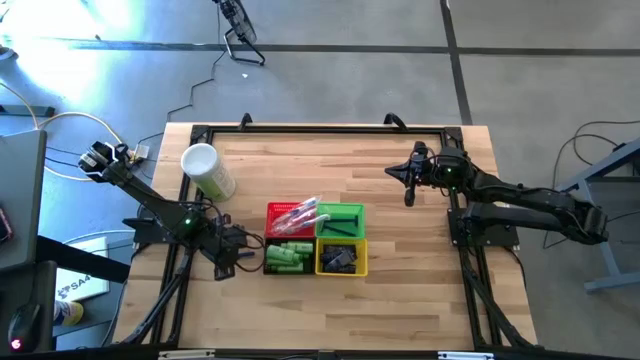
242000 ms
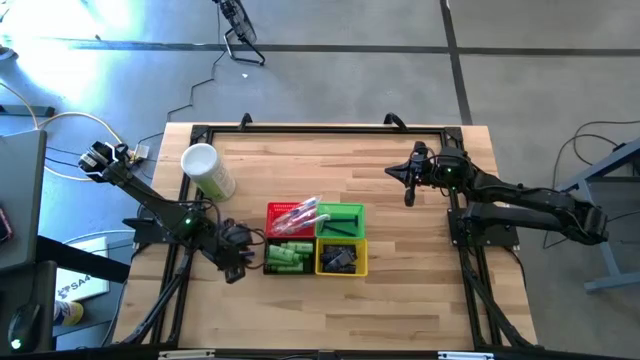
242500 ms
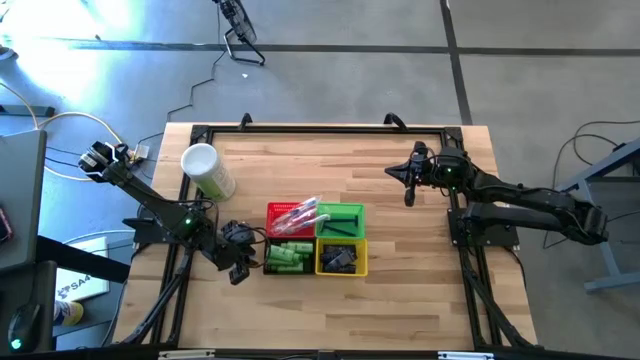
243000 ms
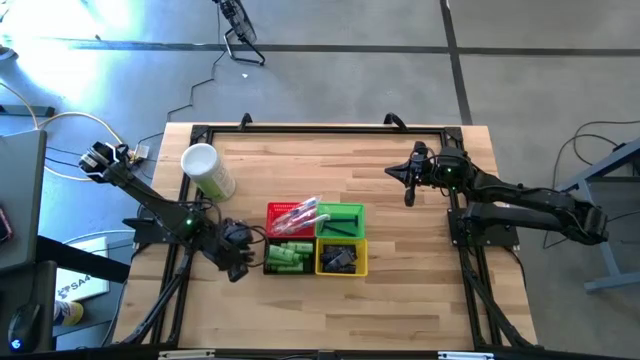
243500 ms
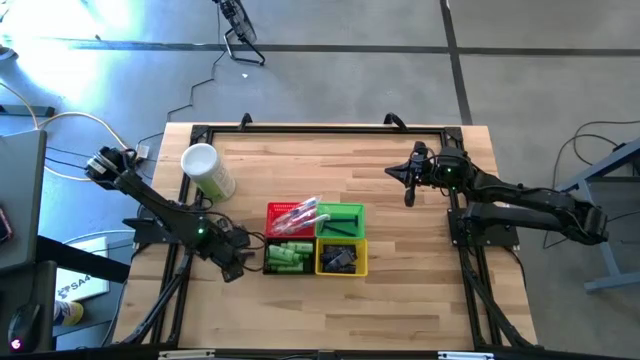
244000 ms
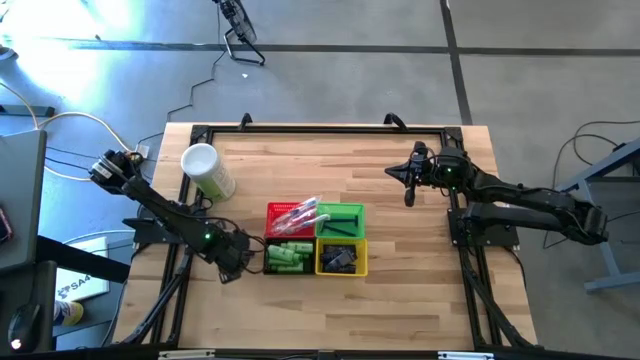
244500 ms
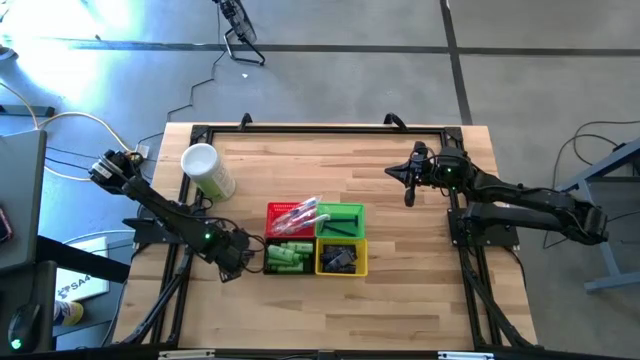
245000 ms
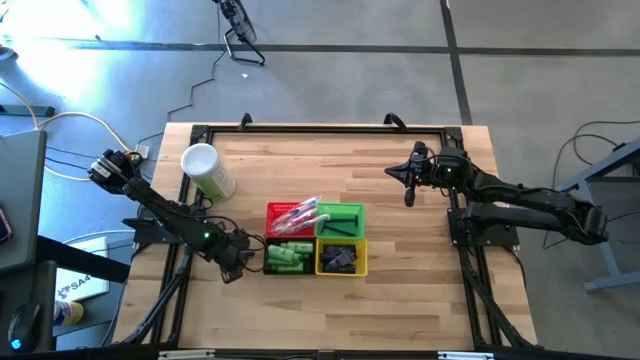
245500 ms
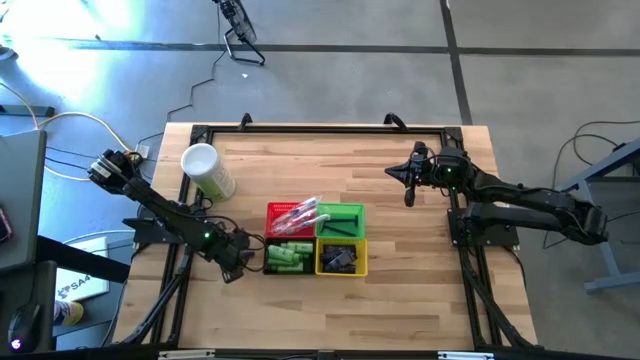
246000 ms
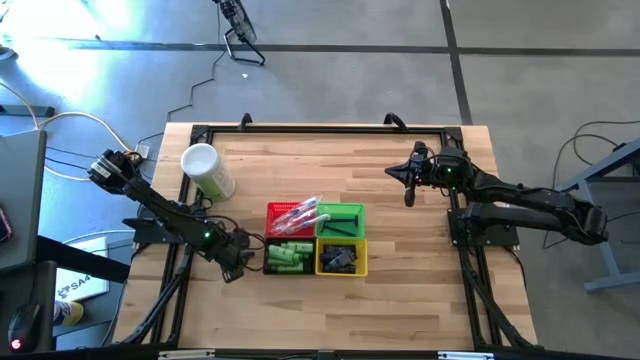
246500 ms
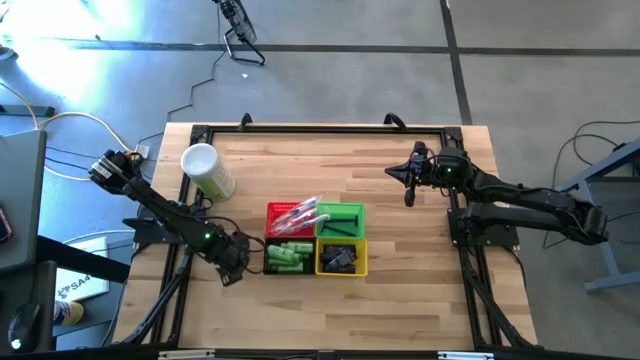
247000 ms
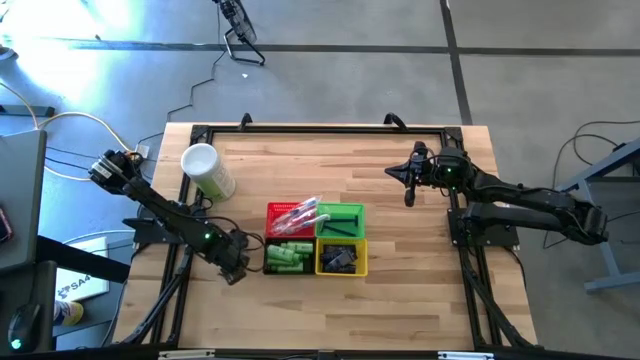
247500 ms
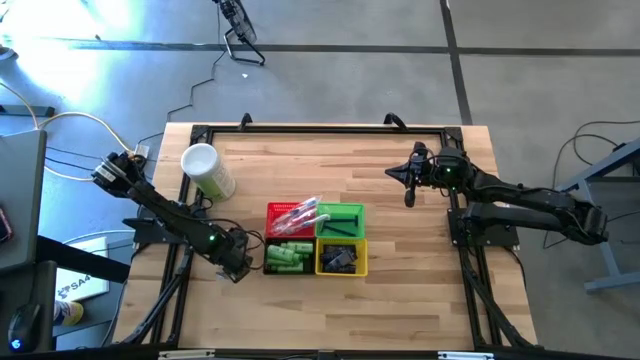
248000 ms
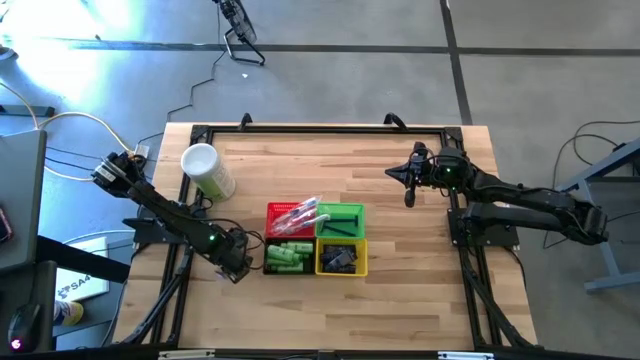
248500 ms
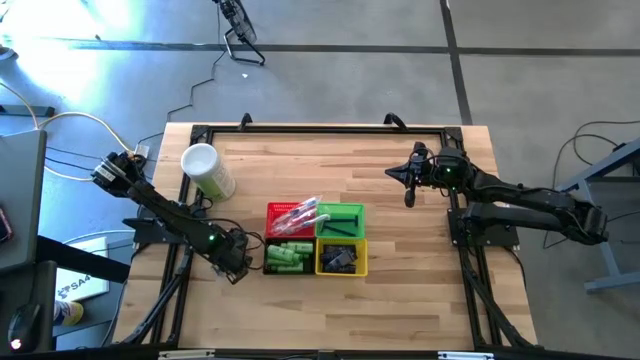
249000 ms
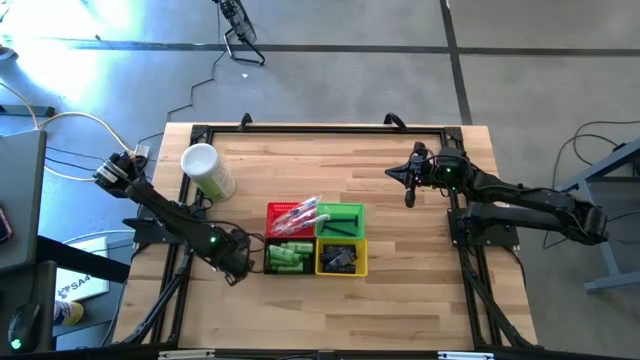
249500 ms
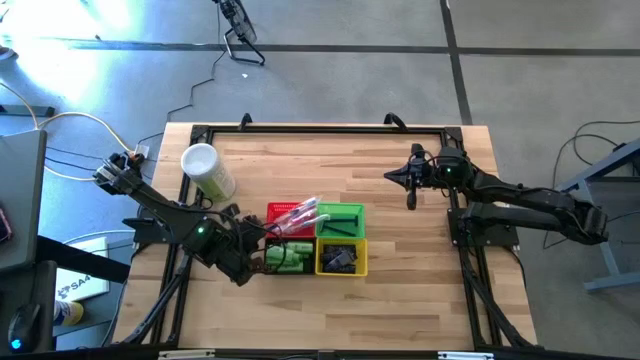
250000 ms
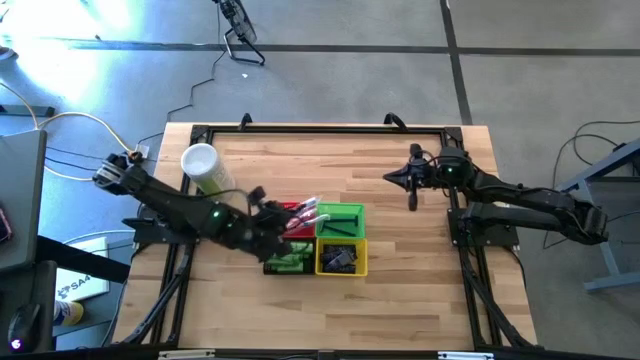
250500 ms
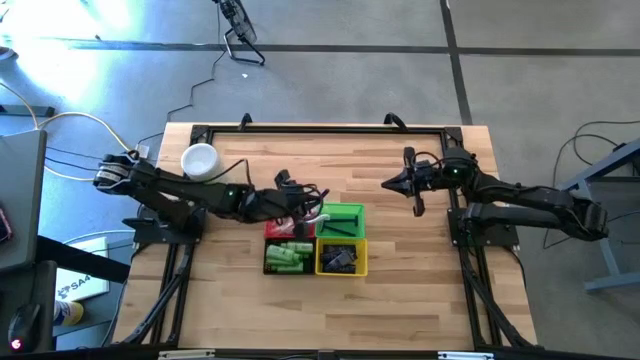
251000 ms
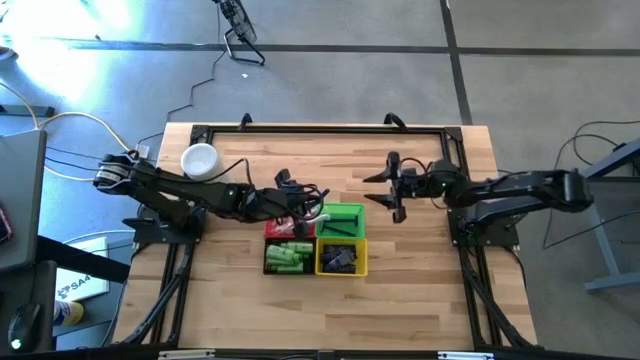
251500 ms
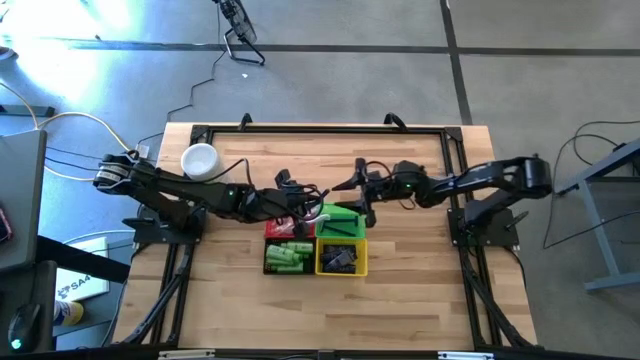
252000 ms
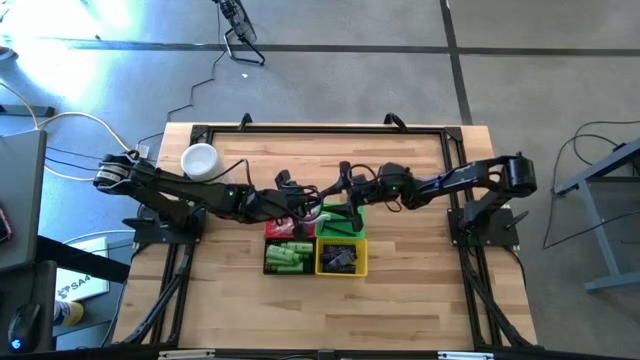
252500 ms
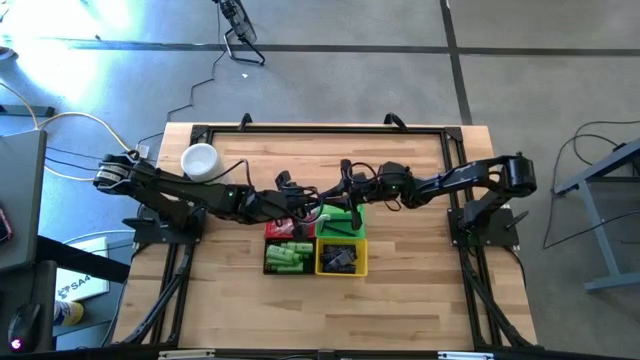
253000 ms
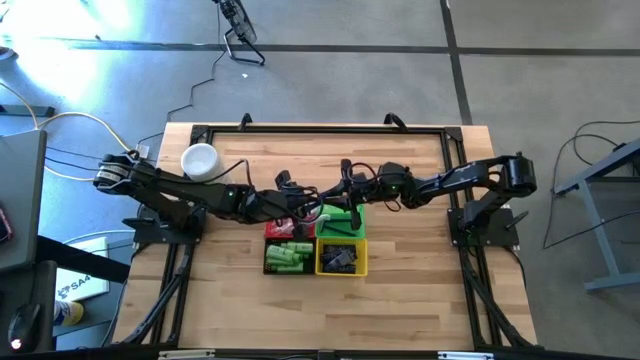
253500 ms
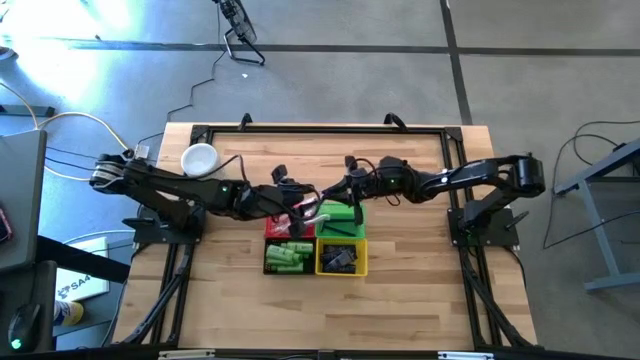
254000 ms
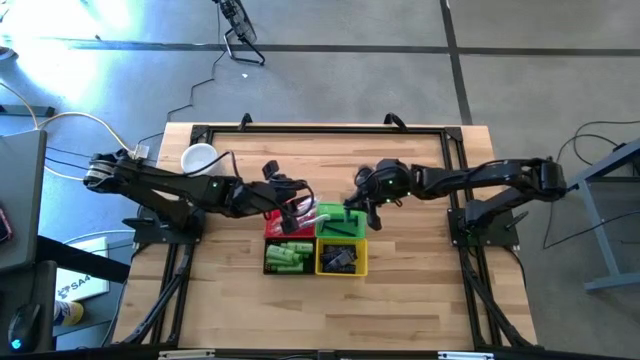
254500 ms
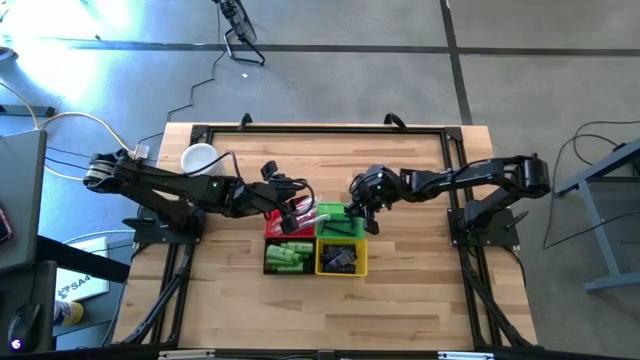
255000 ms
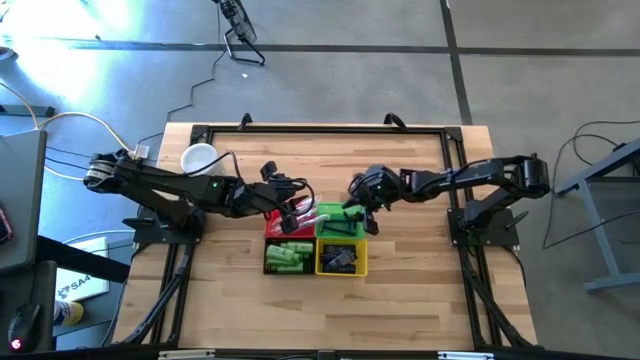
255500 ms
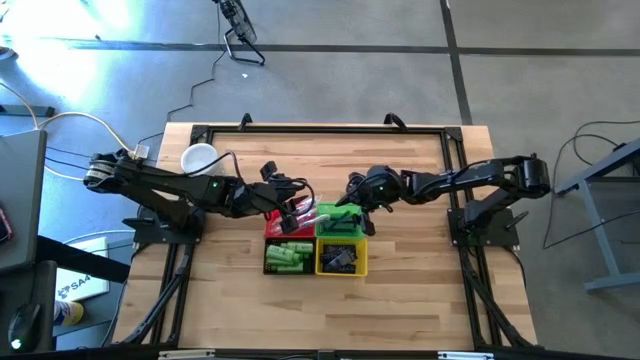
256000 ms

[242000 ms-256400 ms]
Task: Pick & Place Travel size toiletries
Put the blue razor into the green bin

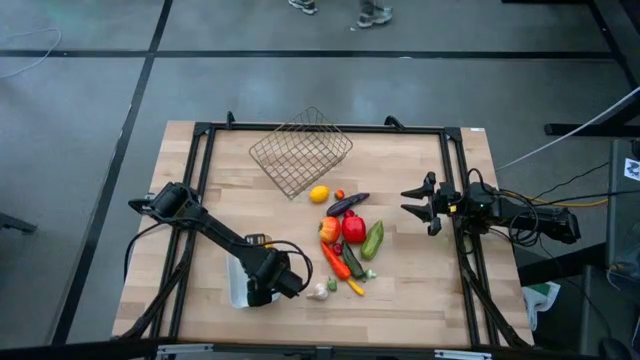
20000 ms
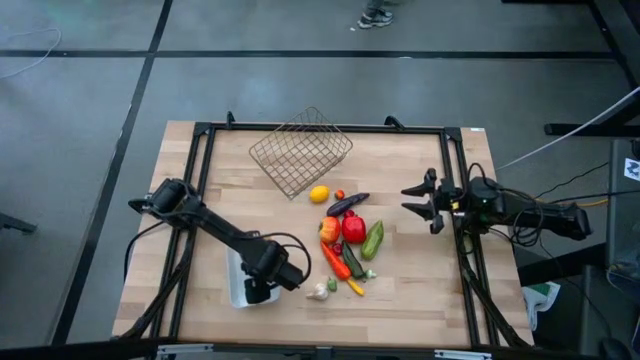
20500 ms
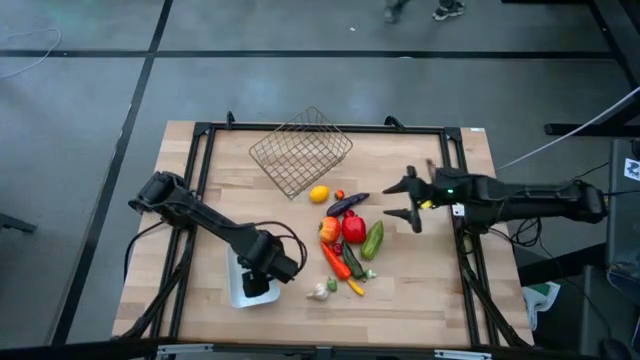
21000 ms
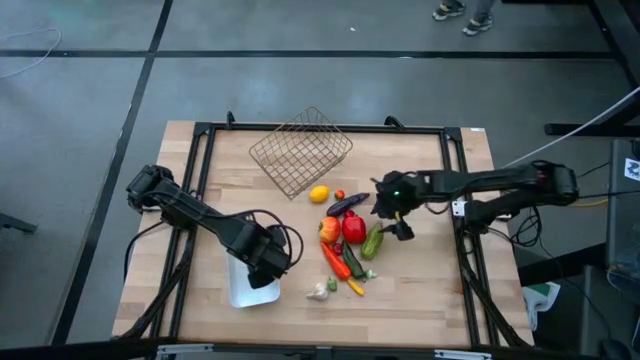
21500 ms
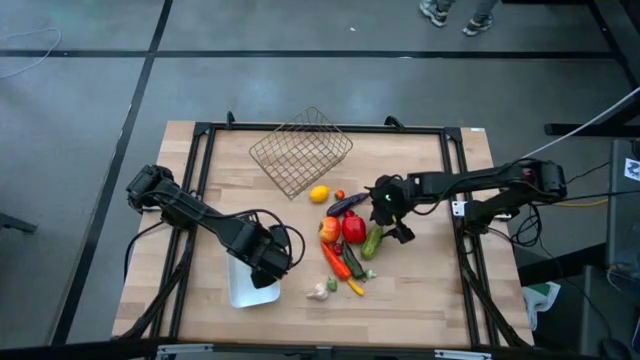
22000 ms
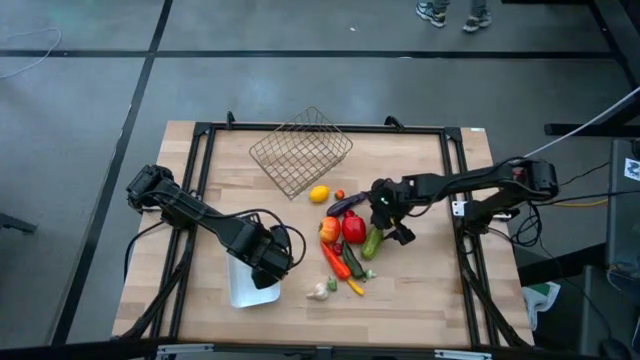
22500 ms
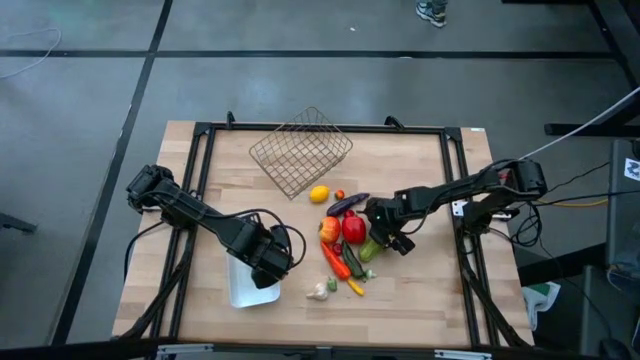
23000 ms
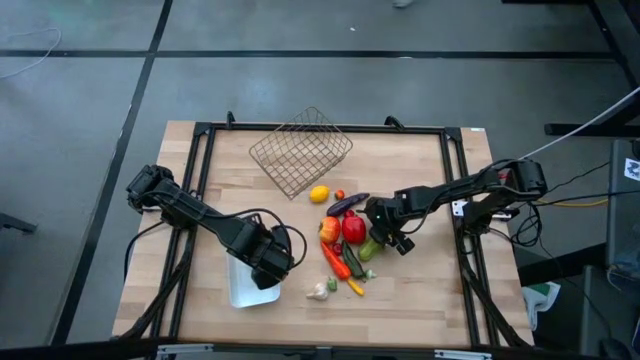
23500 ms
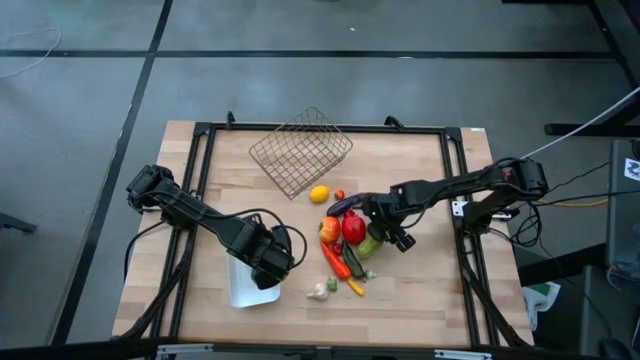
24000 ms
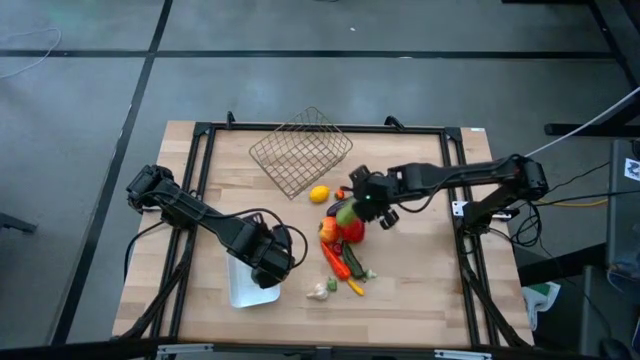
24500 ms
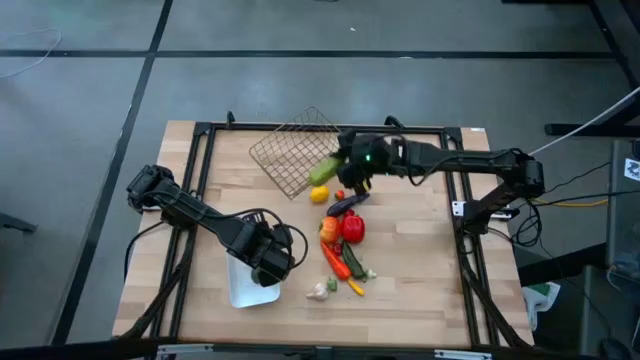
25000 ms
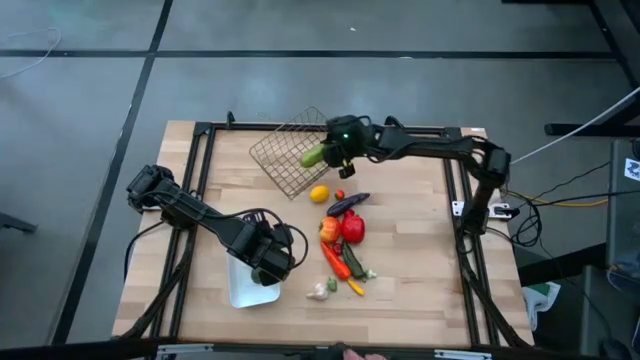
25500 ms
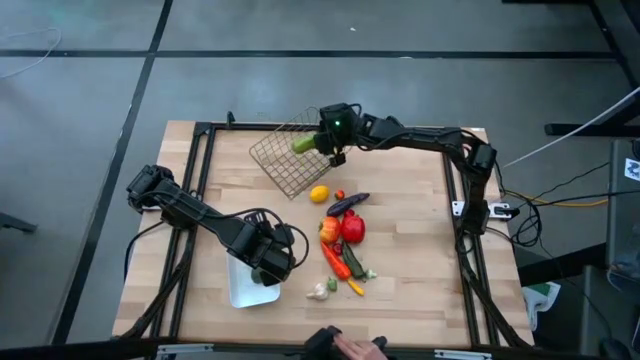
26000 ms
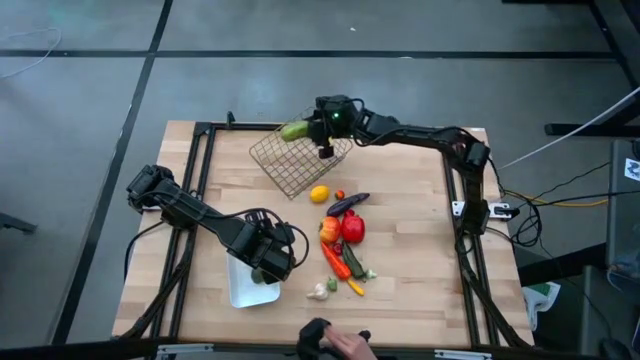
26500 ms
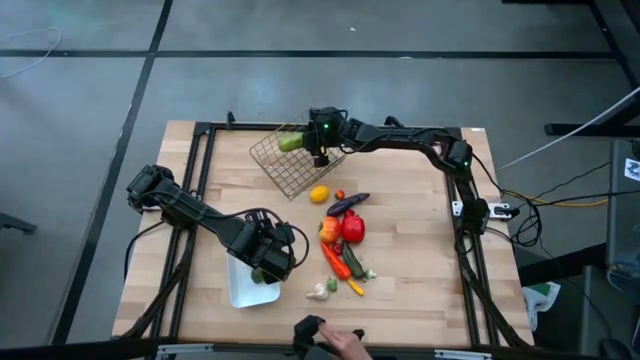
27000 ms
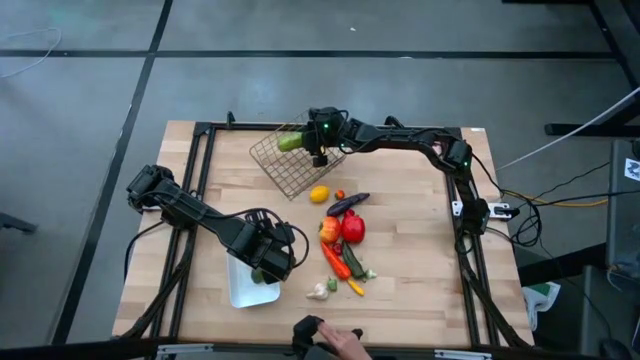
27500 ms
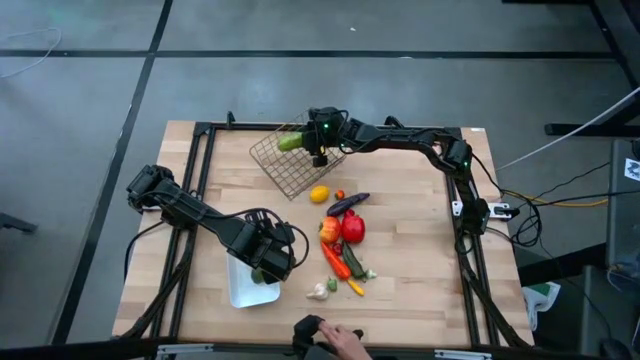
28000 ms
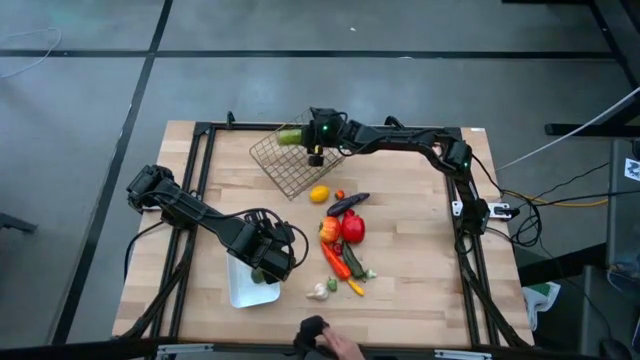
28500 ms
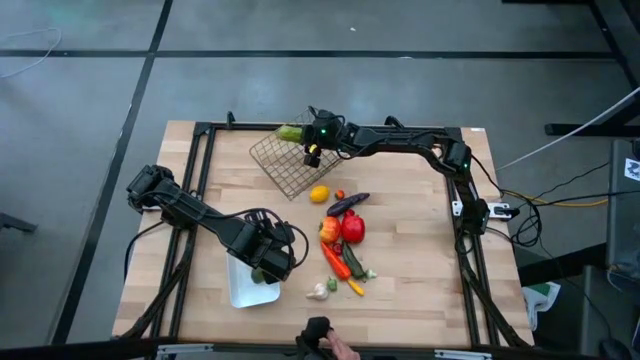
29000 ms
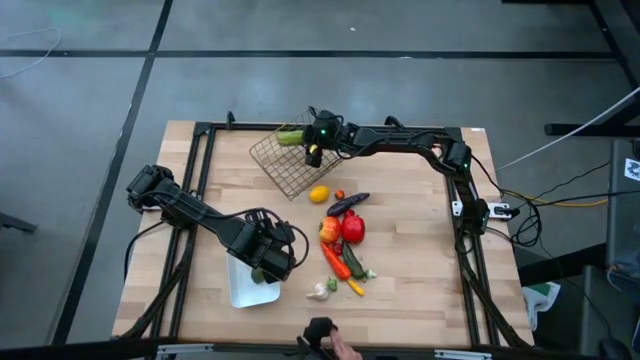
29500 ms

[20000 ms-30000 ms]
Task: Sort produce into baskets
Put the green cucumber into the gold wire basket
